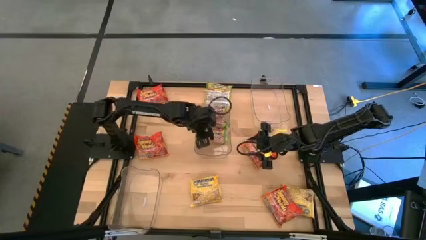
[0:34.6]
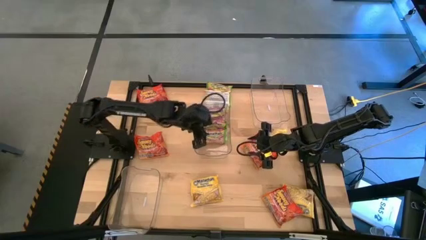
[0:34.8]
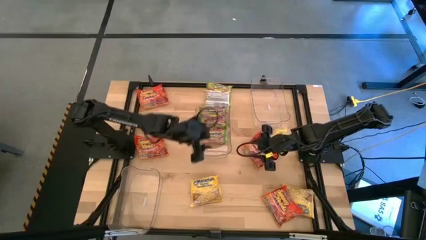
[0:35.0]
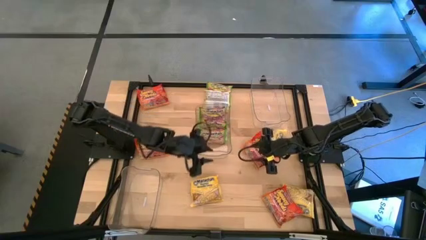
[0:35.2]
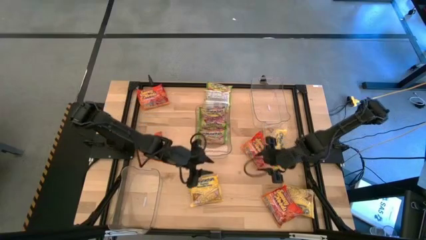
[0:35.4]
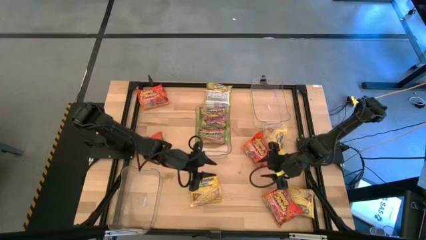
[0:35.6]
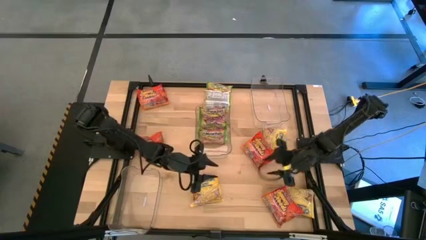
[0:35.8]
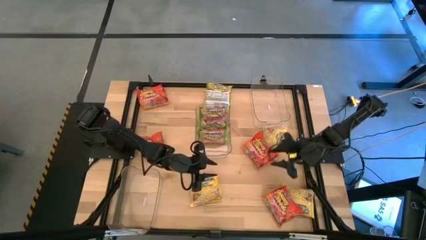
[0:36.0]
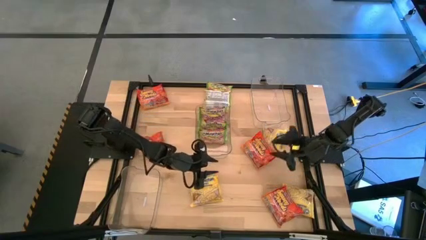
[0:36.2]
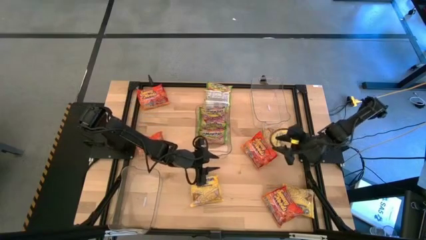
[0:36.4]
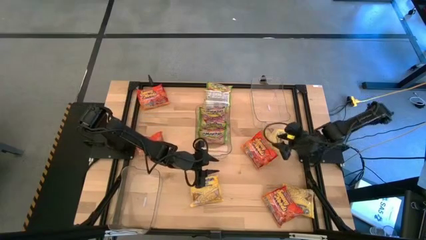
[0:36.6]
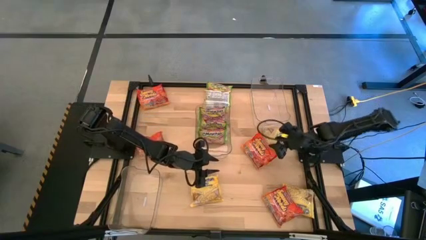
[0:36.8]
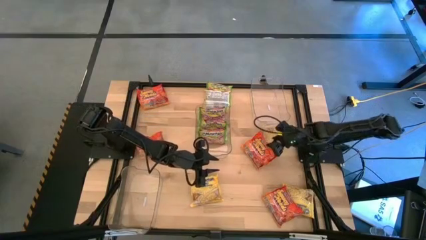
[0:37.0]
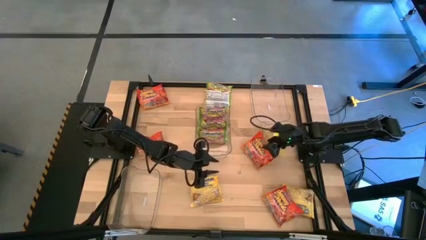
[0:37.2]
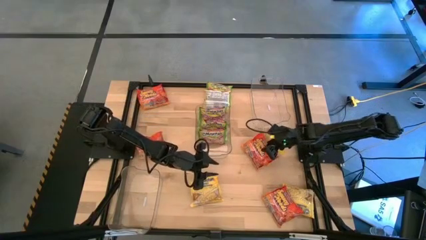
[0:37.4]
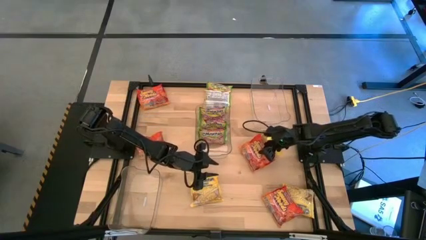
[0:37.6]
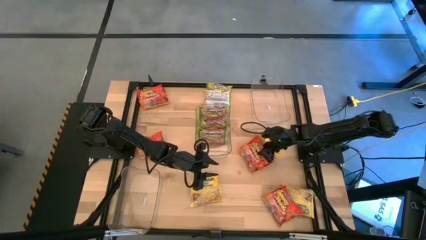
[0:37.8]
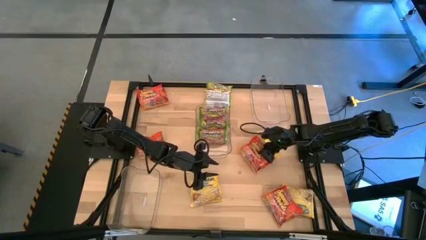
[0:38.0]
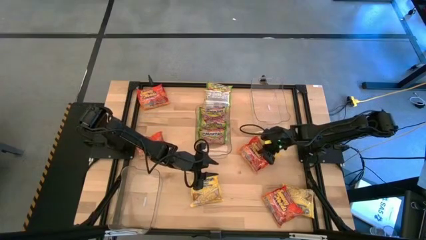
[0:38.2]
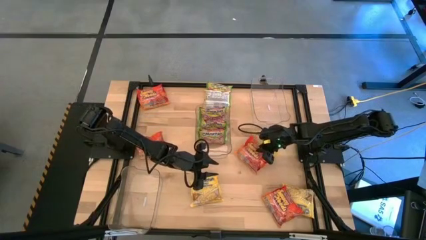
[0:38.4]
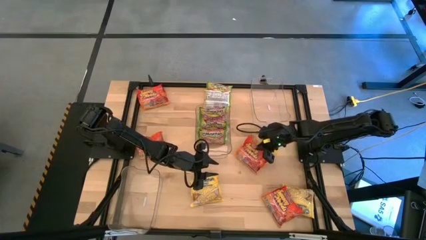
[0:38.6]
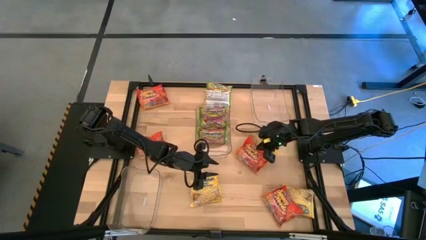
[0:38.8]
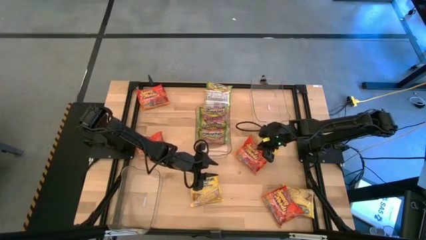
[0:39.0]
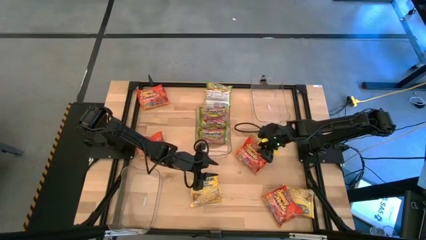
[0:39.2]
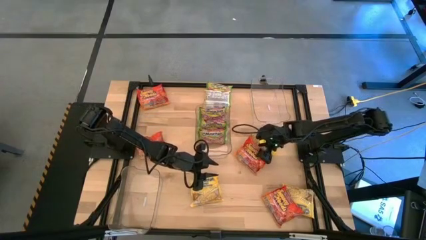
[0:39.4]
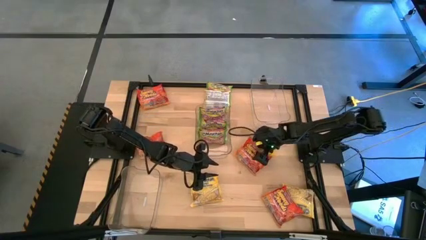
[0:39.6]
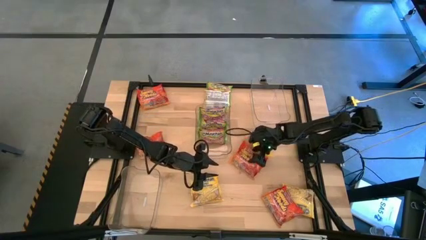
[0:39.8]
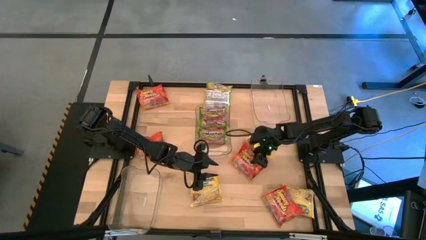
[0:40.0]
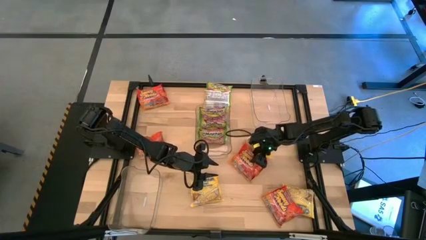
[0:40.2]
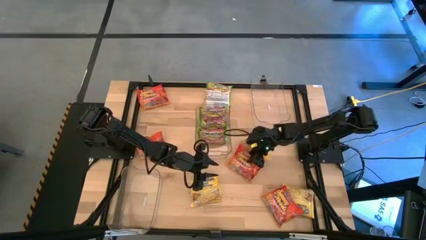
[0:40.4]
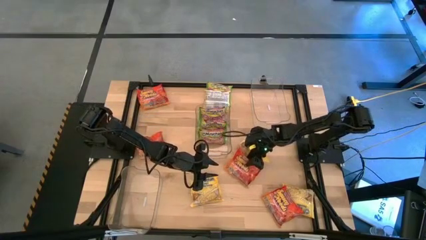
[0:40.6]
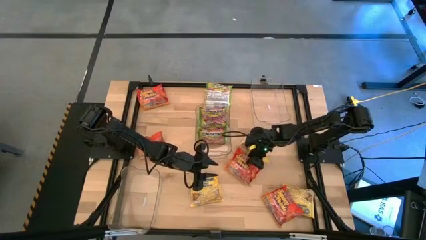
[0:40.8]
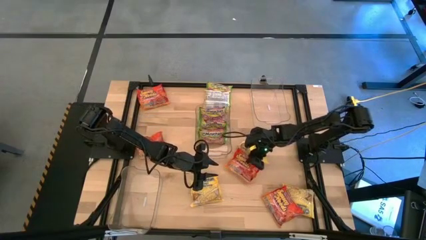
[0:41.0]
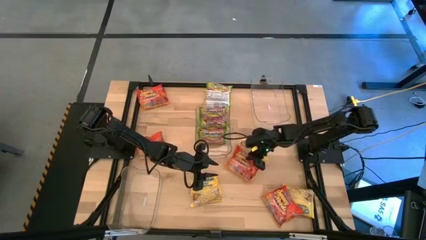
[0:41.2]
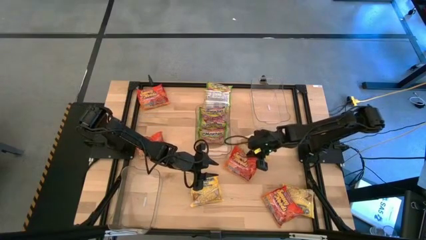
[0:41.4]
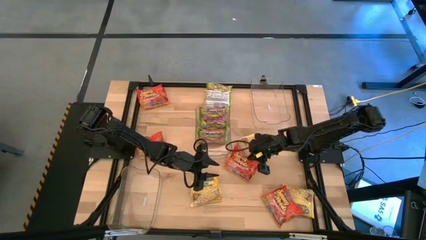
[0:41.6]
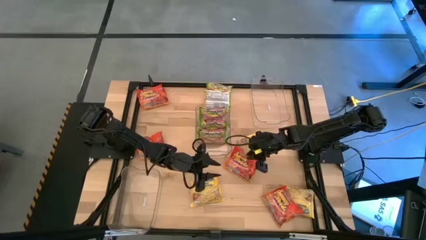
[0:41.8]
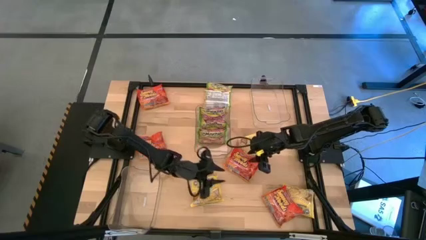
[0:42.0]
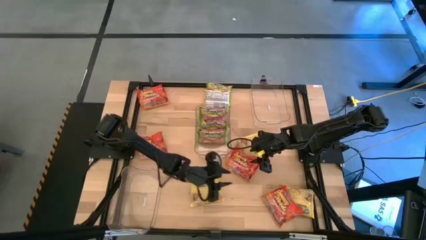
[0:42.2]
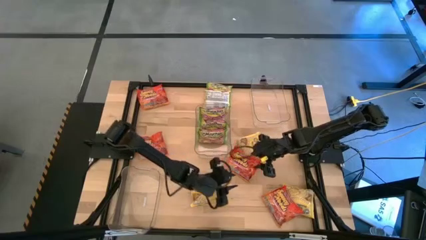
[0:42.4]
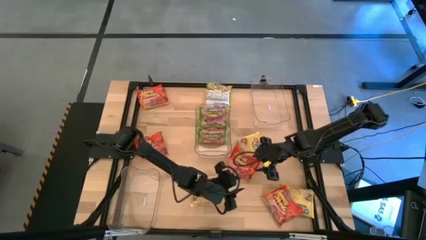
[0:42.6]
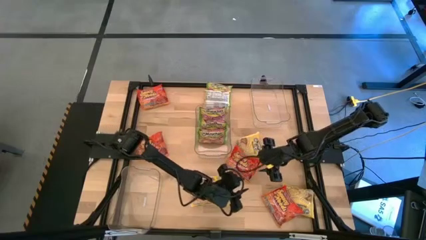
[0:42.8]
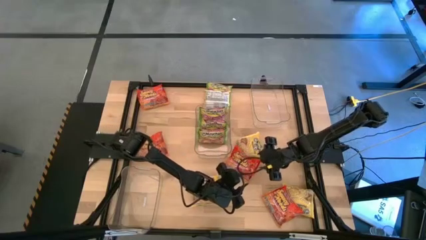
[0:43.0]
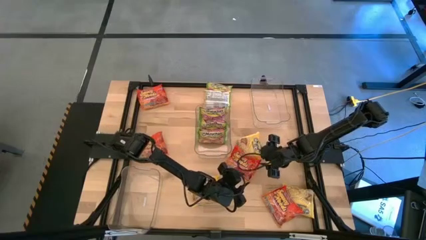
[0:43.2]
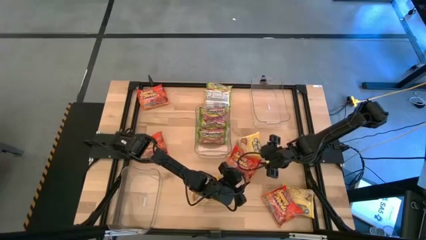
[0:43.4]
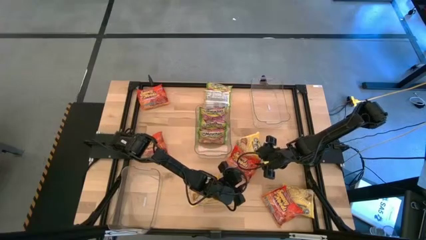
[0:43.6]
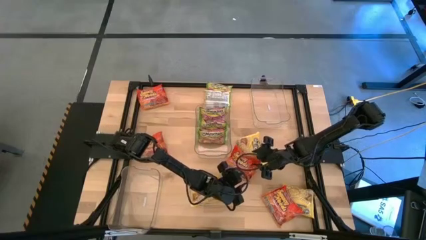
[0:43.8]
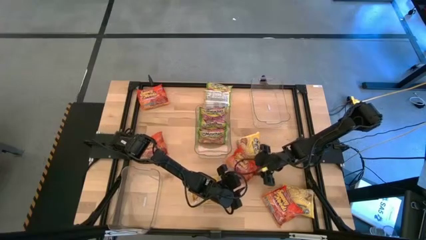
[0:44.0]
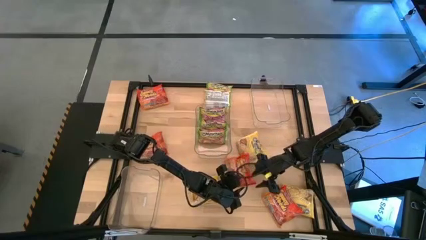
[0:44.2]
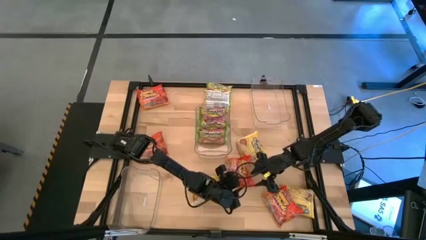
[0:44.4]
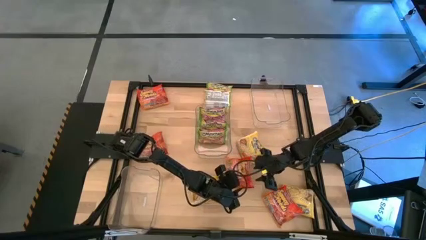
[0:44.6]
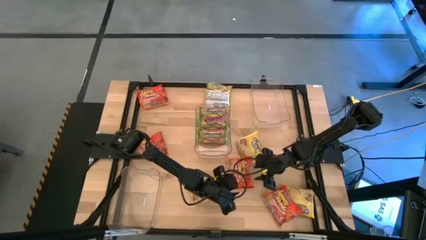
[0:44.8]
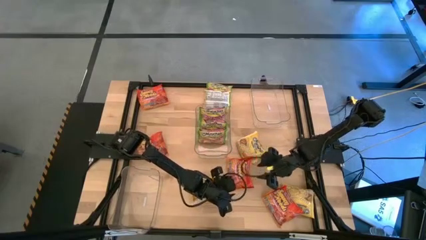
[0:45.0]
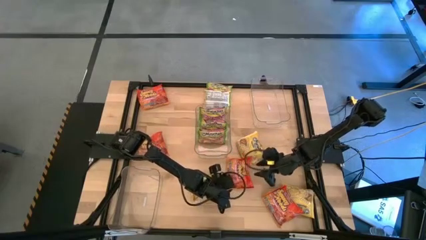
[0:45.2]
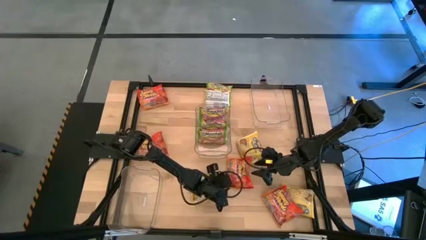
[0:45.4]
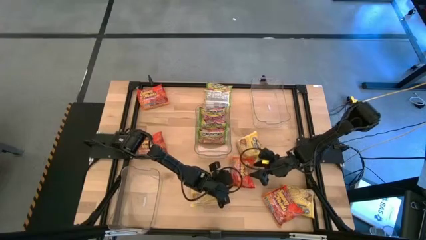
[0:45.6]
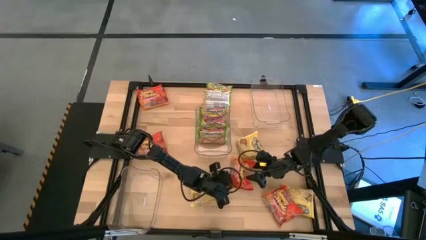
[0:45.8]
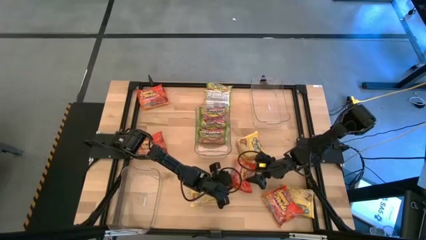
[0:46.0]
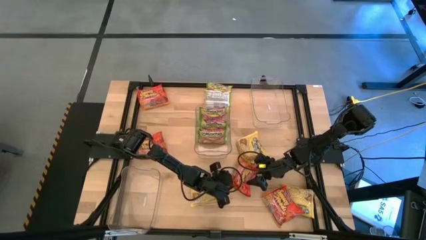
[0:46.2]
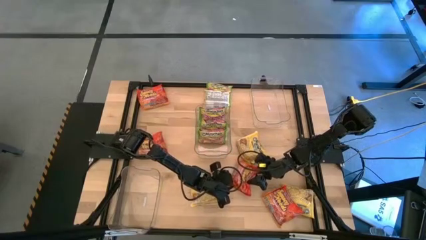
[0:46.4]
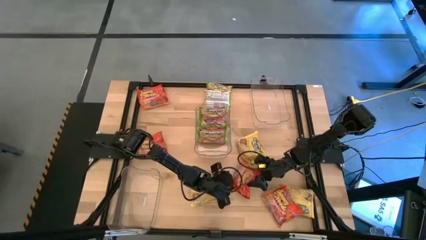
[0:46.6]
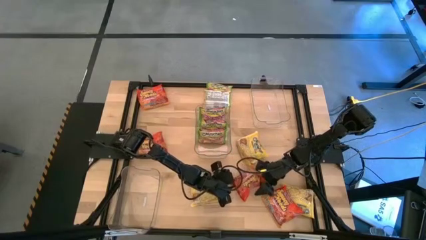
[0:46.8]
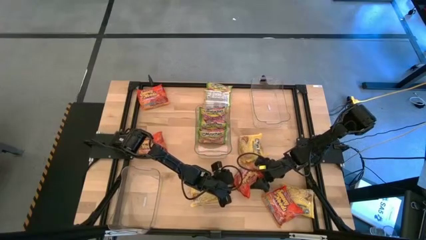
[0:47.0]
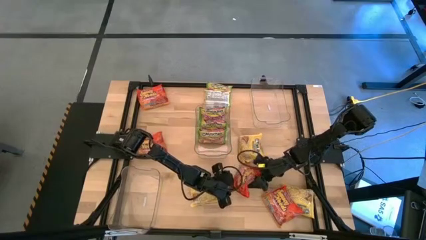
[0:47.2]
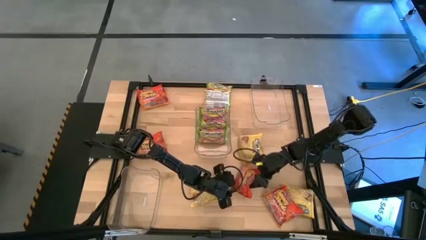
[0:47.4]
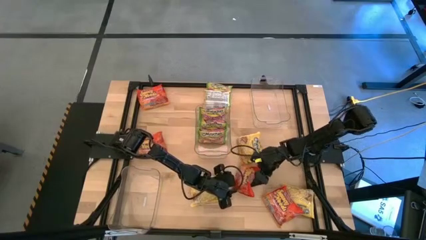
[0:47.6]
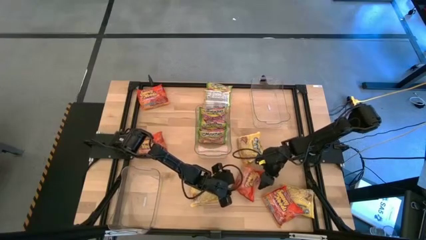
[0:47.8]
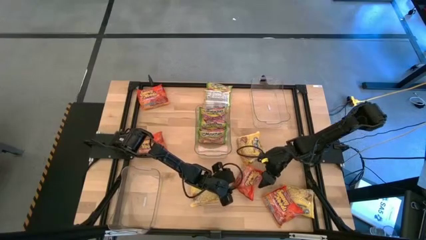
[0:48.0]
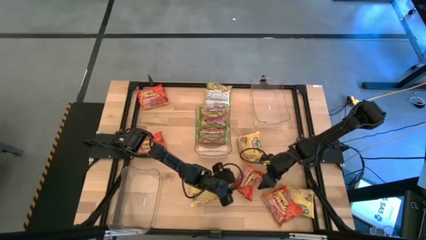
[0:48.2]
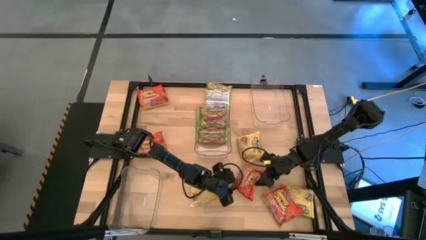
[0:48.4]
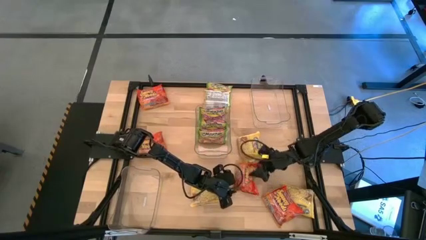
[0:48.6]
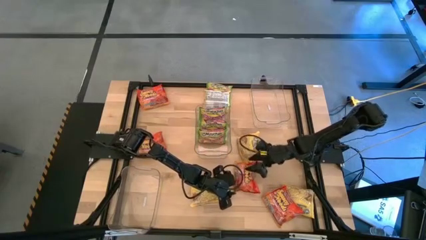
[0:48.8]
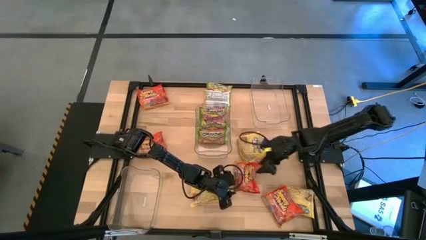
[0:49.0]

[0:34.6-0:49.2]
Task: Sort Maruchan noodles
Put the orange noodle pack into the top right transparent bin
